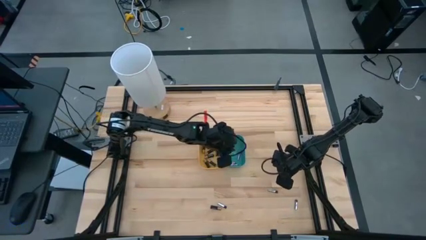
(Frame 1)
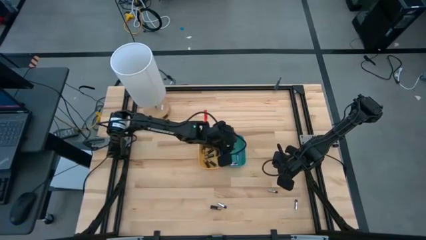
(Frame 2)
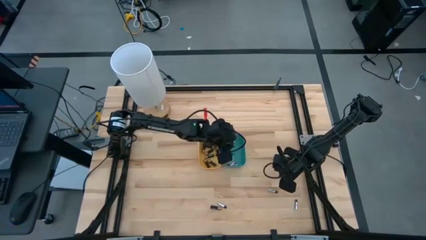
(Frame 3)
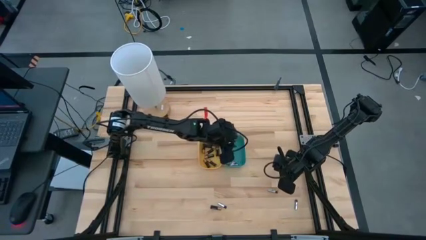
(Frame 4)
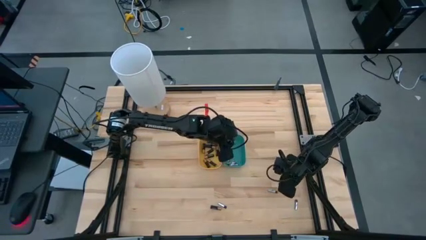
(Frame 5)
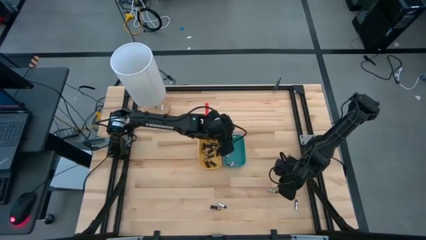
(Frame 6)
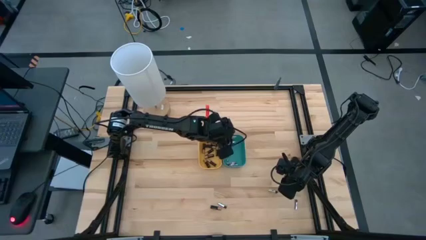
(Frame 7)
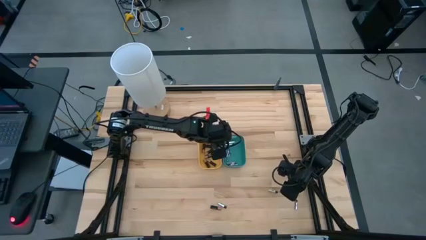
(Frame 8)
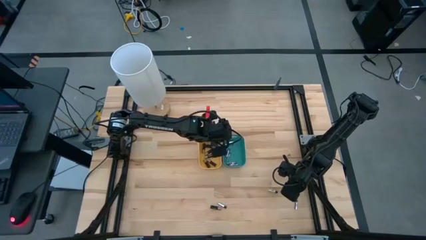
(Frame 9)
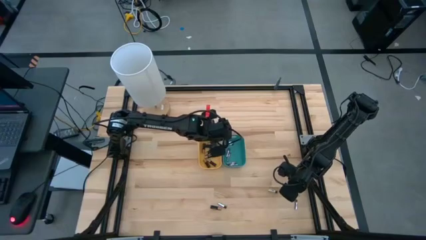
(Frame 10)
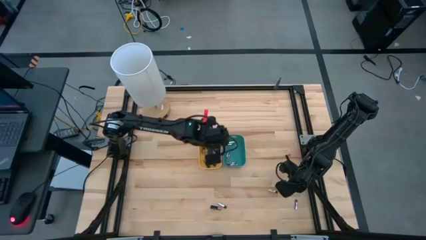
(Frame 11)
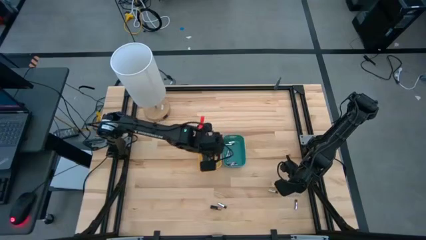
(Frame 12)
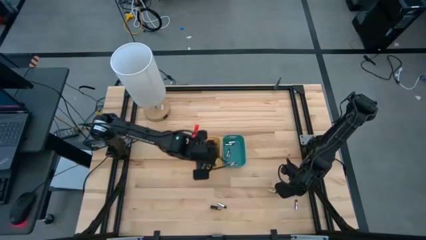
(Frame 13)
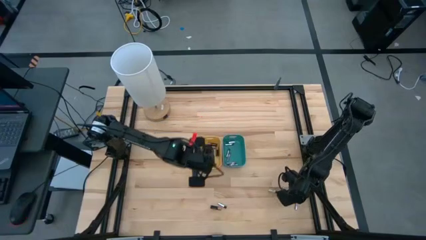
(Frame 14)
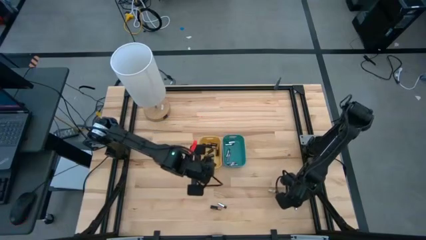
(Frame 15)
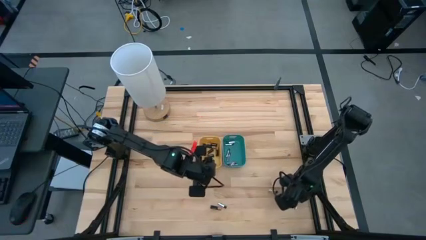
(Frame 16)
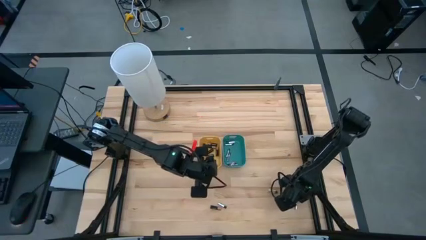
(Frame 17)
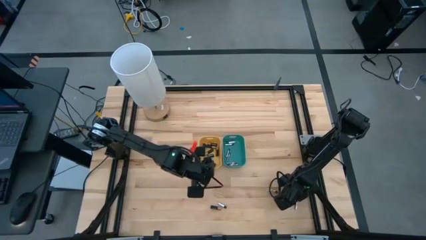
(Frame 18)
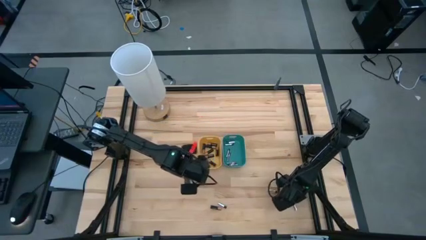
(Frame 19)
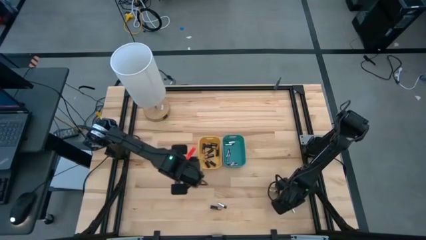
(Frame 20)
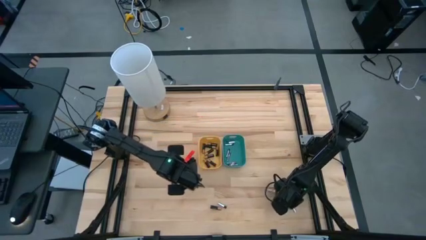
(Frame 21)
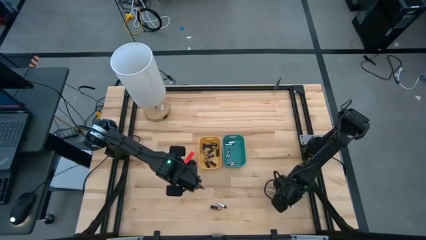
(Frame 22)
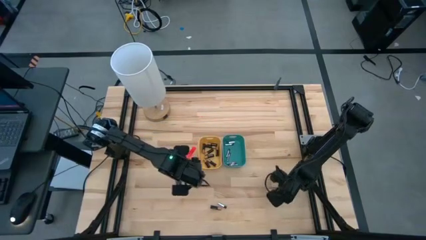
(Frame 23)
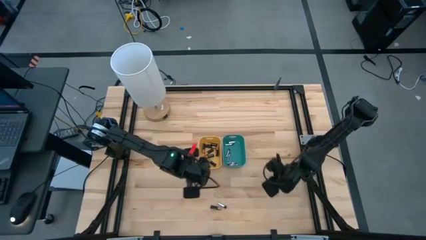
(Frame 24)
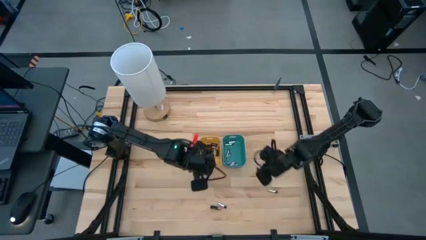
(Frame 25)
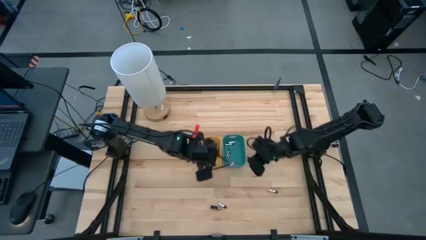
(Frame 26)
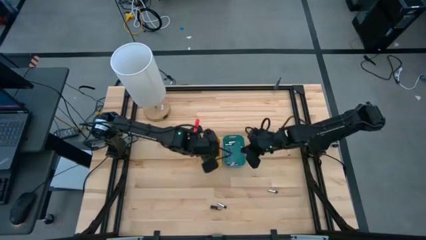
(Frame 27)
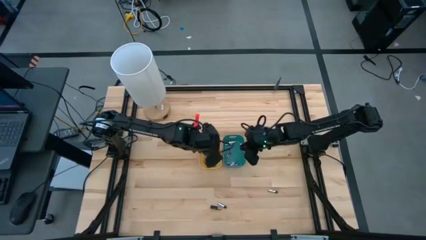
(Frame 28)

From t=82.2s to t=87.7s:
Task: Sort batteries
Put the silver battery into the blue bin

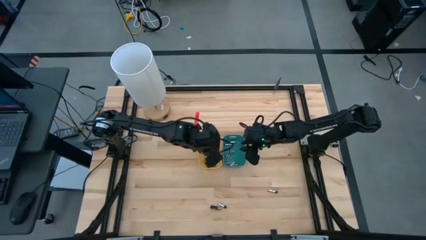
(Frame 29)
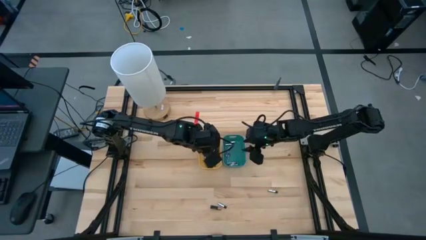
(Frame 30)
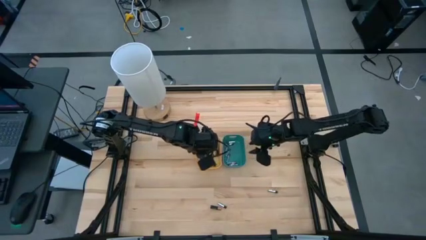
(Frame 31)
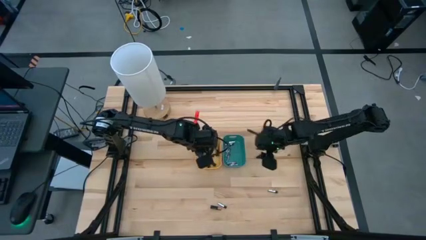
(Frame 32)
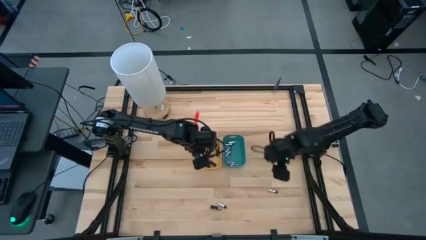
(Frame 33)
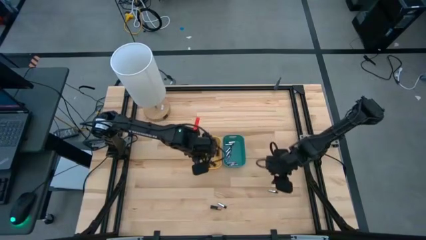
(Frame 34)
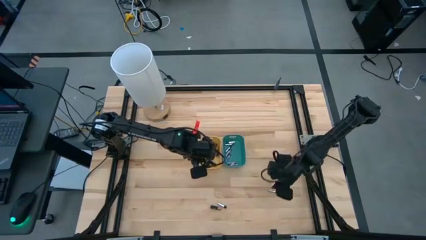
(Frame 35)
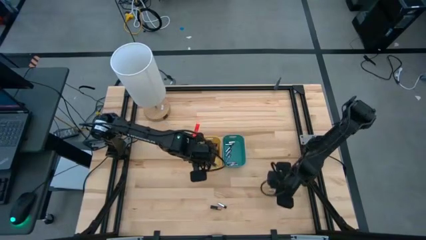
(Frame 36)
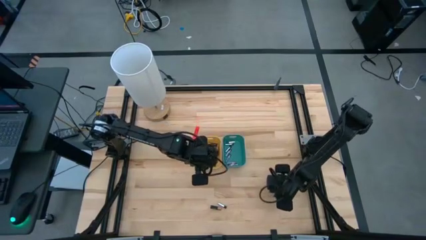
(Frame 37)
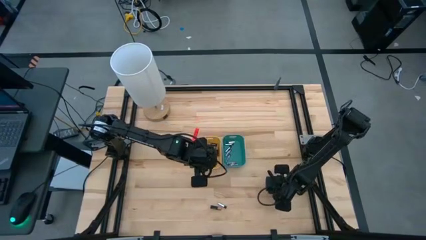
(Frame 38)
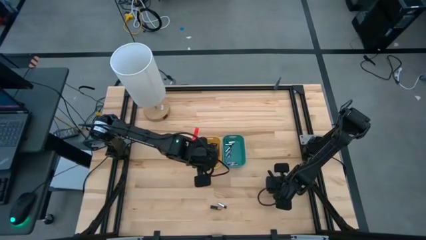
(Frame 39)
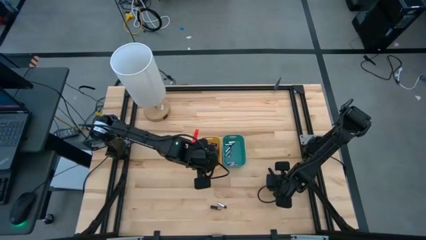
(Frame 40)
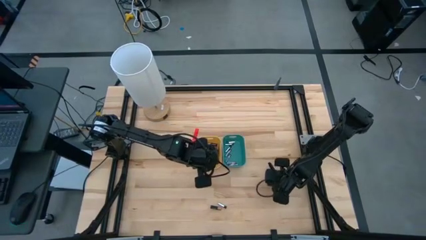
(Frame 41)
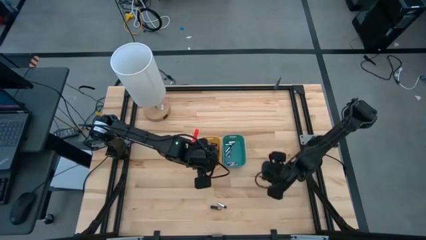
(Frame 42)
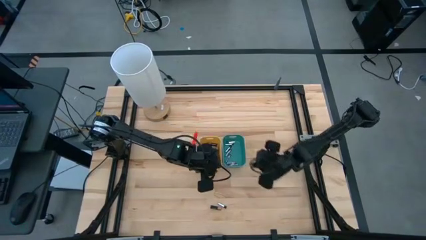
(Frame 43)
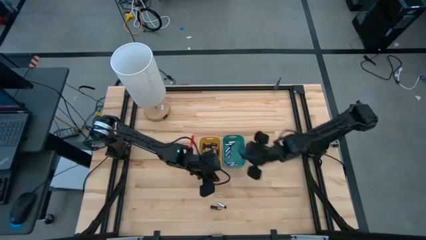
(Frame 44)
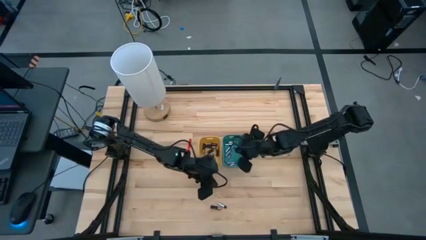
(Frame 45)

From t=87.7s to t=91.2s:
Put the silver battery into the blue bin

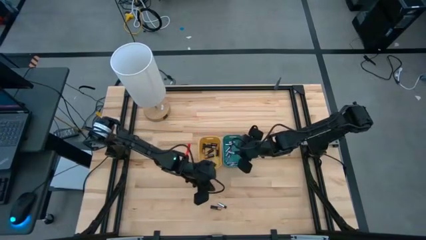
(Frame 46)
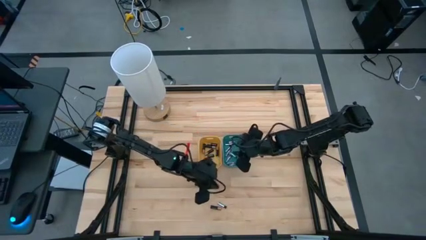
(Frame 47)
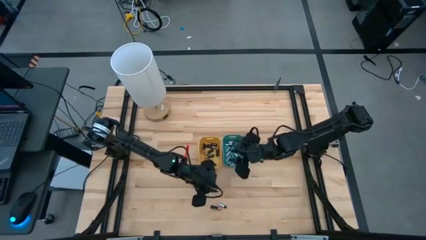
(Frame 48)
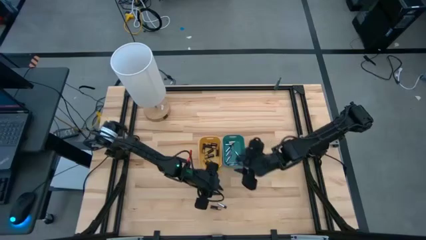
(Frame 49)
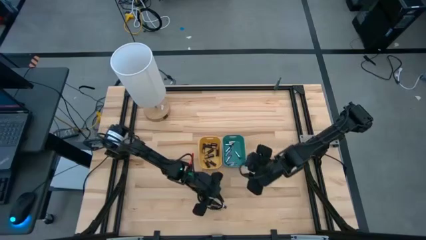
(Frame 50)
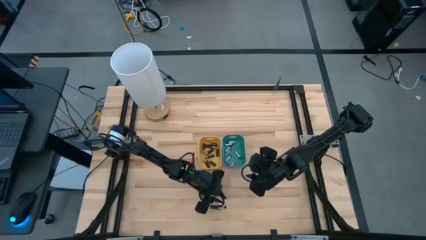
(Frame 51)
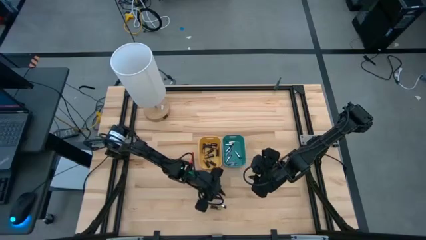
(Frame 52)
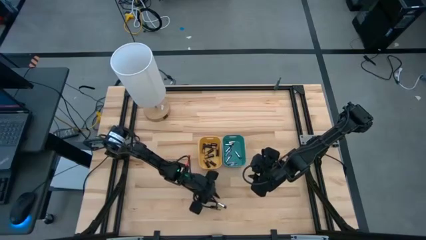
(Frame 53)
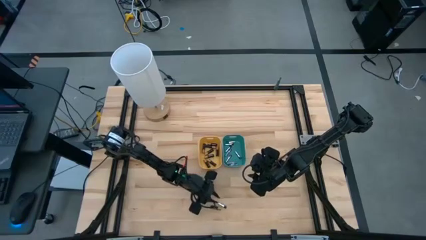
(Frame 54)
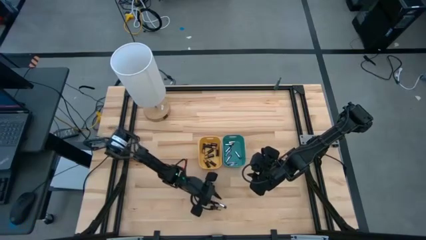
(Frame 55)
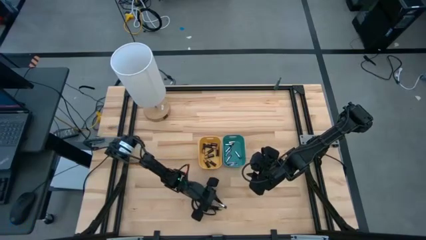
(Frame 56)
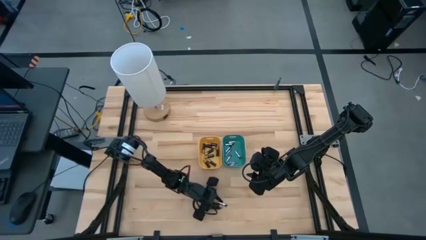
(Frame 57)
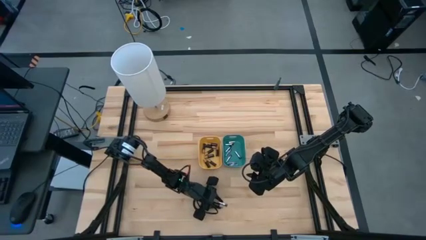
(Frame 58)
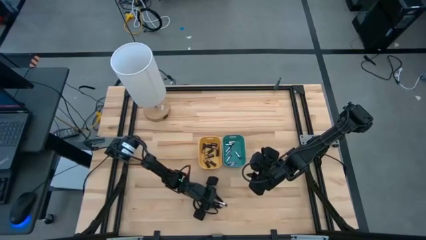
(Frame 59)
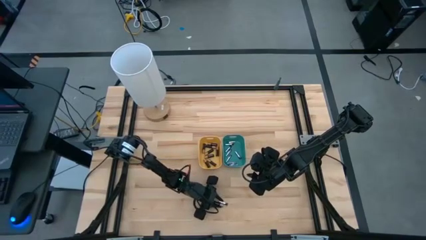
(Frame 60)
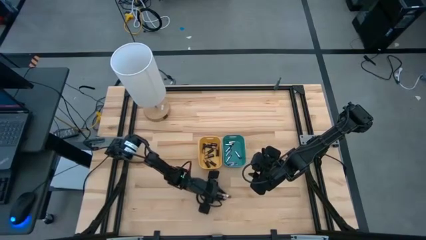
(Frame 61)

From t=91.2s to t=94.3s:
Put the silver battery into the blue bin

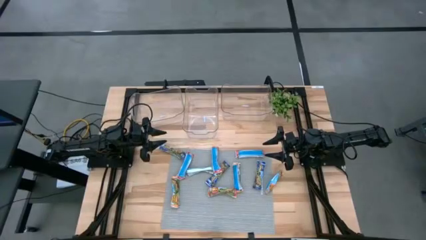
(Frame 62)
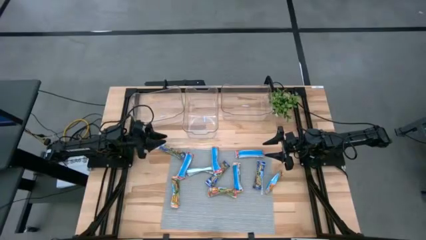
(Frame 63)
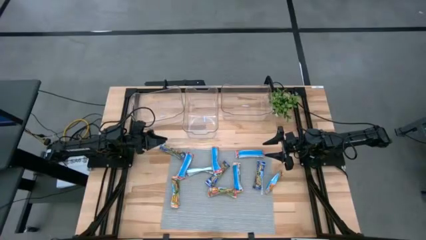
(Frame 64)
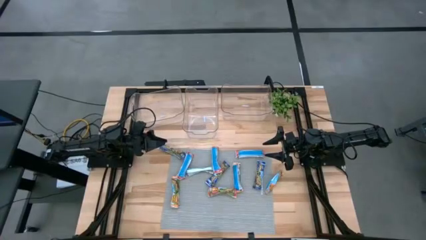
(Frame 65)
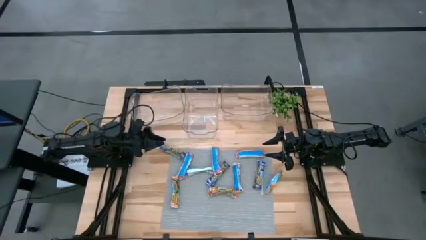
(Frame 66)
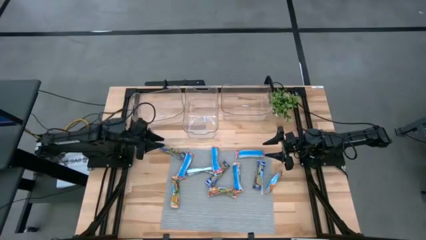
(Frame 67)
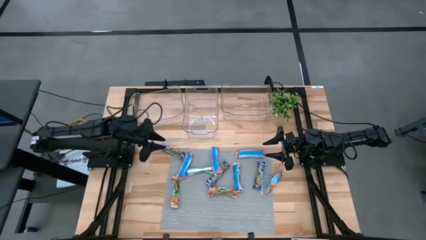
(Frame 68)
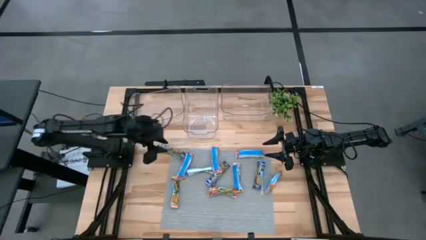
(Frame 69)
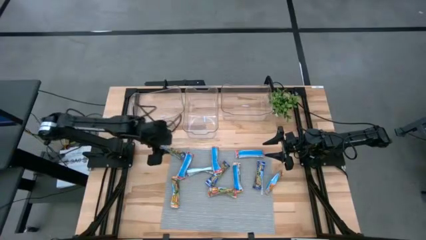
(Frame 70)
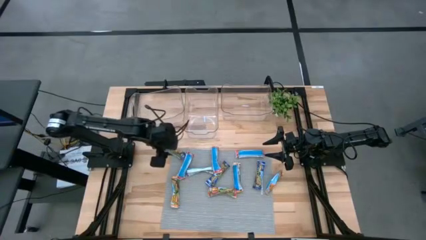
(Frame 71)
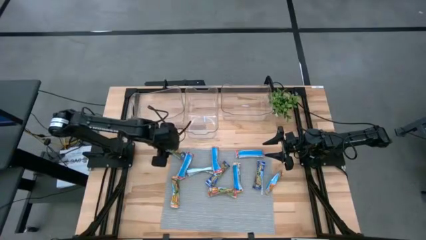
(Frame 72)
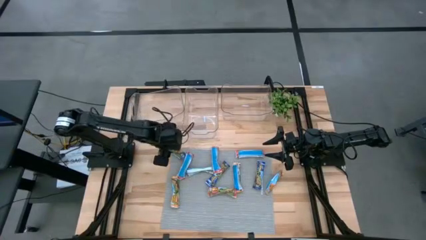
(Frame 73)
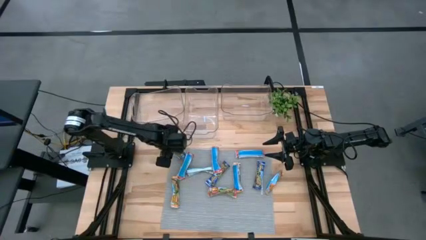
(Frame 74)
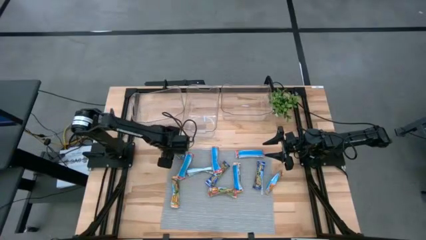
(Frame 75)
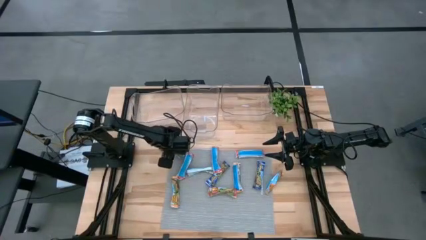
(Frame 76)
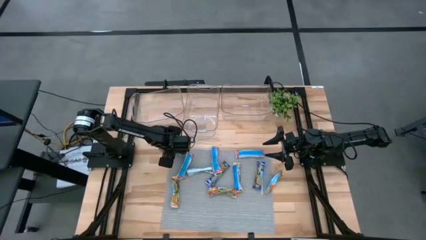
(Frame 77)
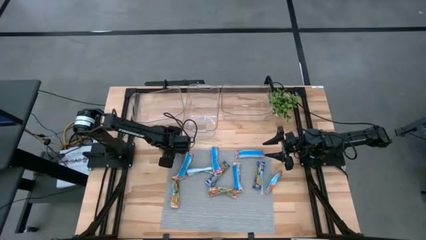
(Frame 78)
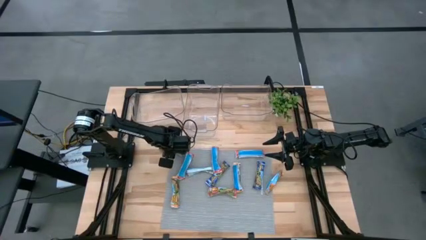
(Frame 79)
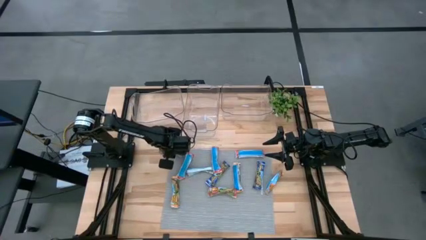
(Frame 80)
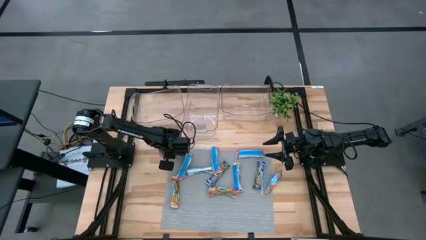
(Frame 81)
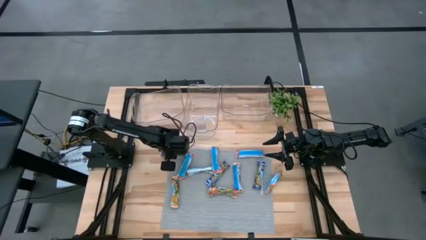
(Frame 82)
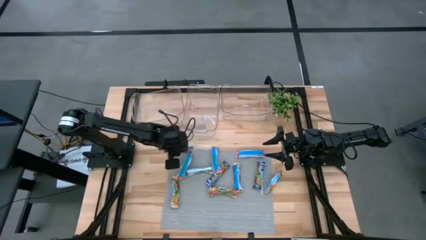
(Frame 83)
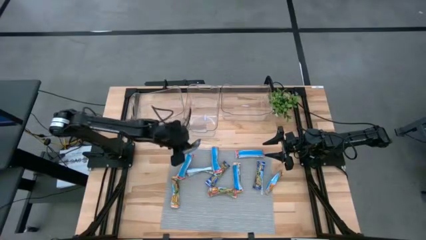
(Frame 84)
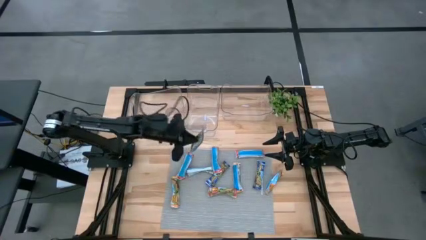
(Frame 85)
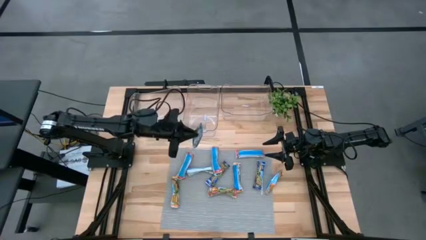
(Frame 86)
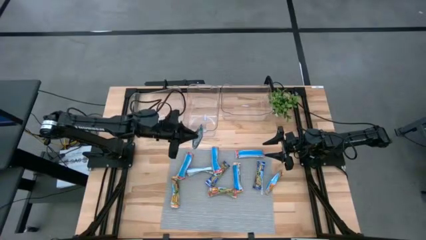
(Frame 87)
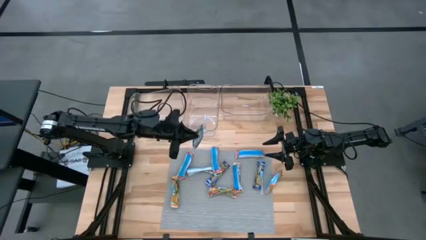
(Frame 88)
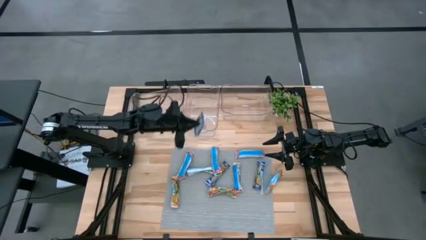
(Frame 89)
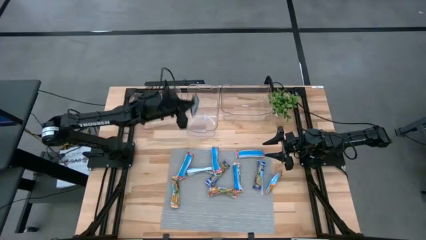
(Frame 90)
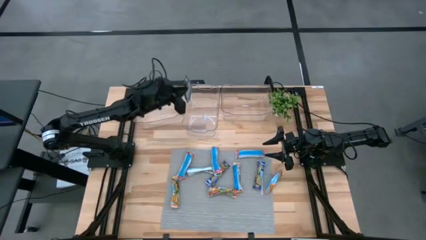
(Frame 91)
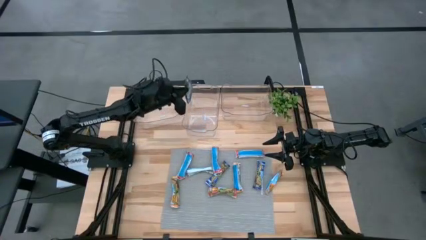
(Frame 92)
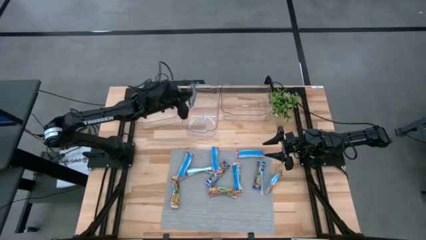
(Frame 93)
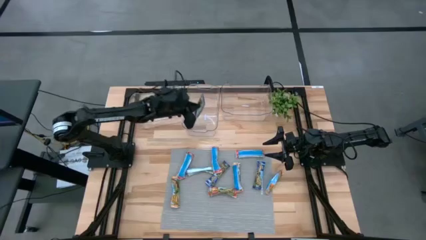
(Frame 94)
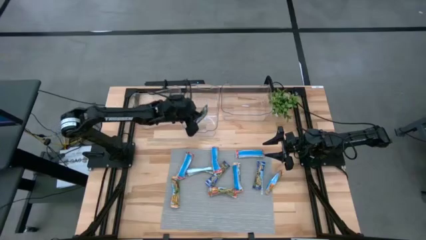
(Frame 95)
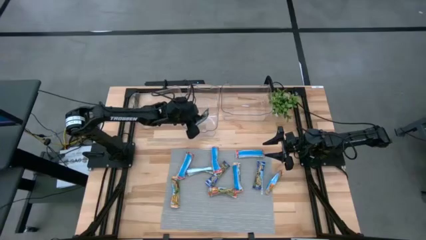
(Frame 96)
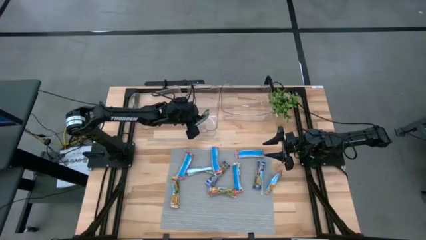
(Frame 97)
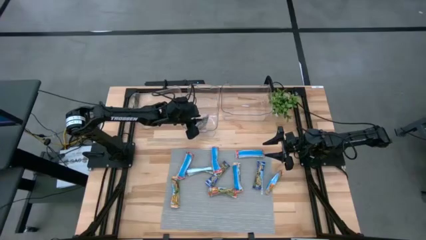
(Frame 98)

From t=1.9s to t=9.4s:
Task: Pick and place Granola Bars by type
Put the left blue granola bar into the middle transparent bin
